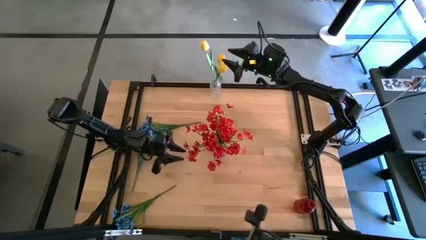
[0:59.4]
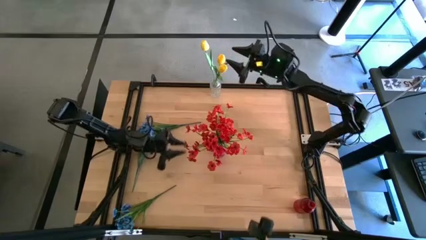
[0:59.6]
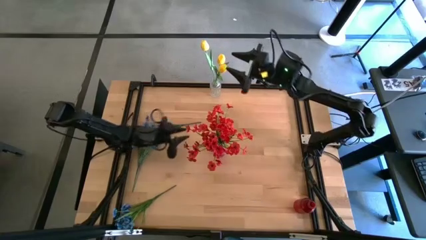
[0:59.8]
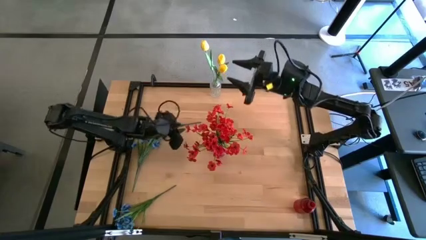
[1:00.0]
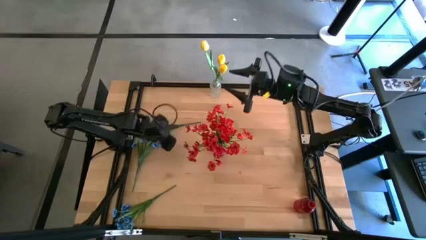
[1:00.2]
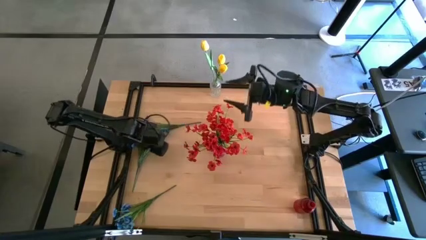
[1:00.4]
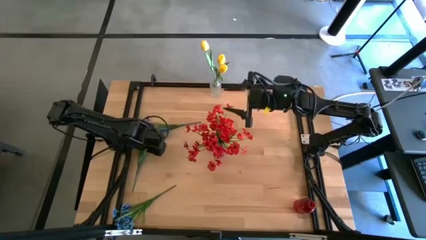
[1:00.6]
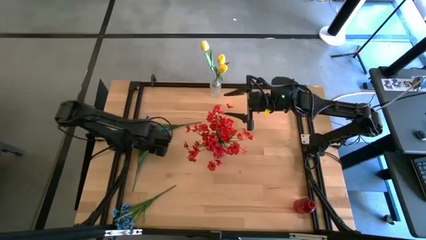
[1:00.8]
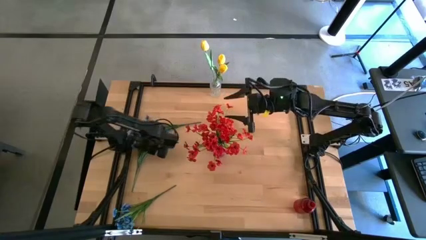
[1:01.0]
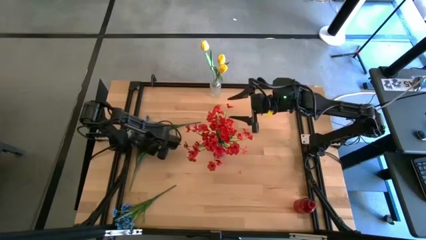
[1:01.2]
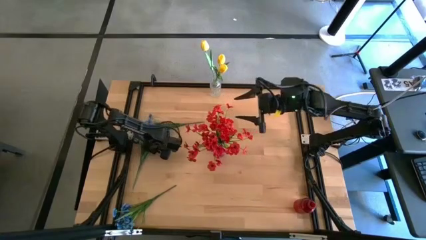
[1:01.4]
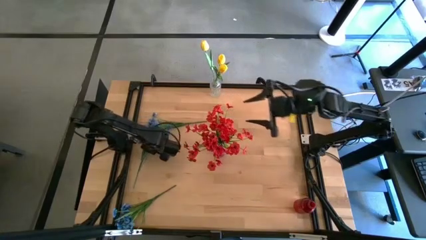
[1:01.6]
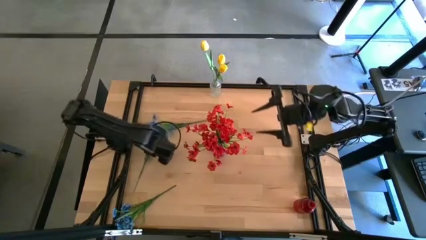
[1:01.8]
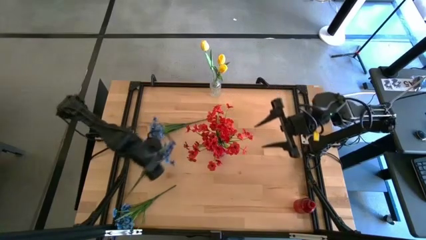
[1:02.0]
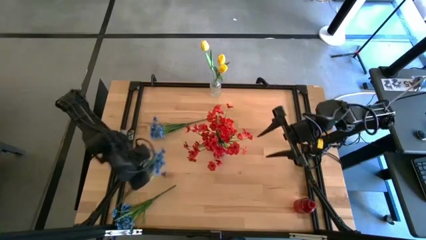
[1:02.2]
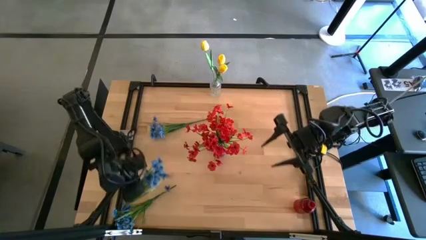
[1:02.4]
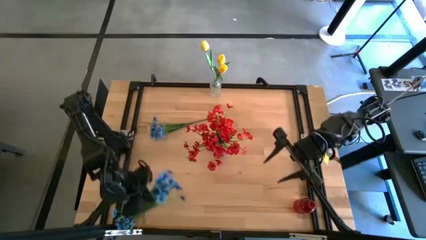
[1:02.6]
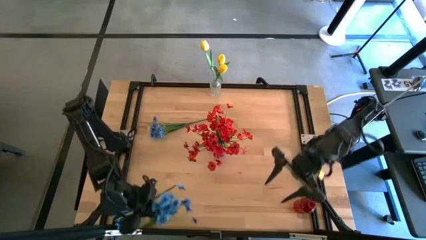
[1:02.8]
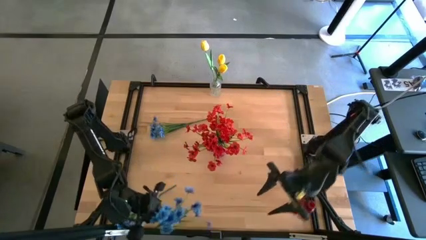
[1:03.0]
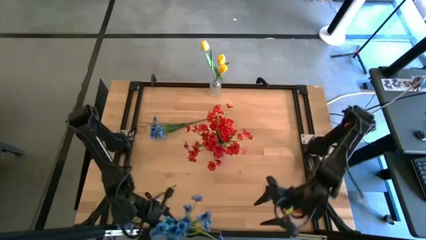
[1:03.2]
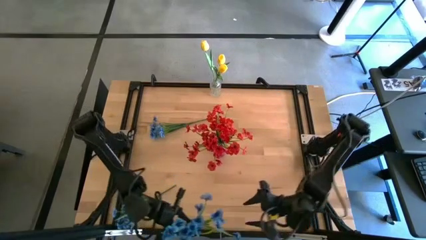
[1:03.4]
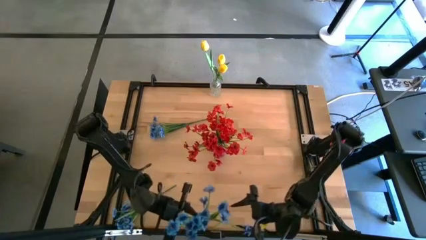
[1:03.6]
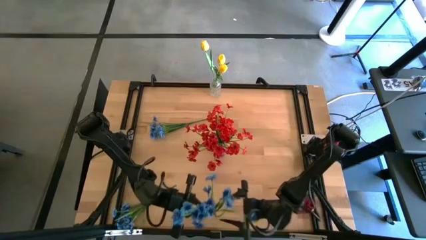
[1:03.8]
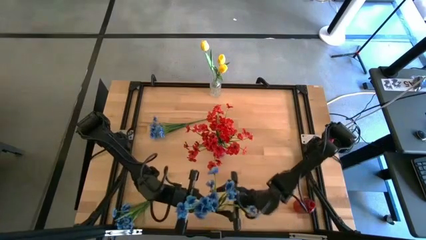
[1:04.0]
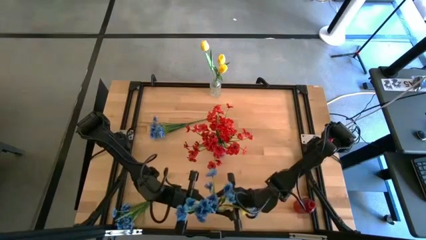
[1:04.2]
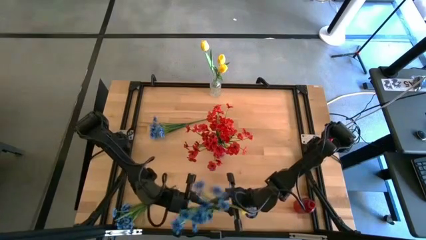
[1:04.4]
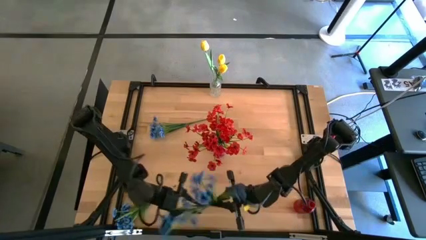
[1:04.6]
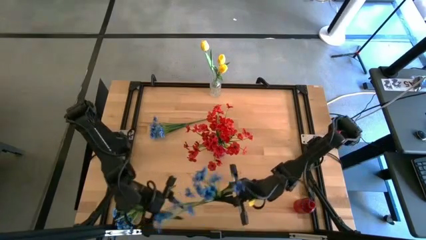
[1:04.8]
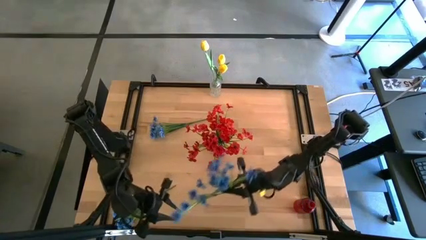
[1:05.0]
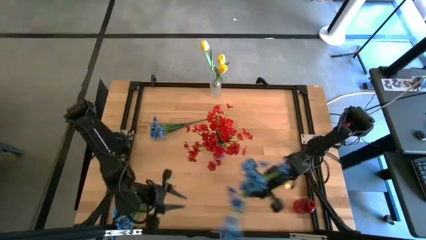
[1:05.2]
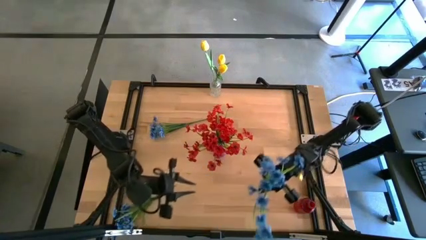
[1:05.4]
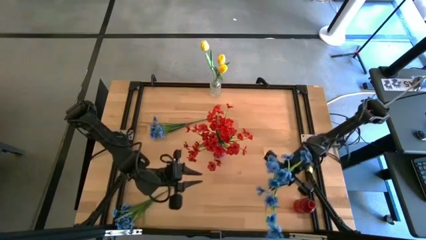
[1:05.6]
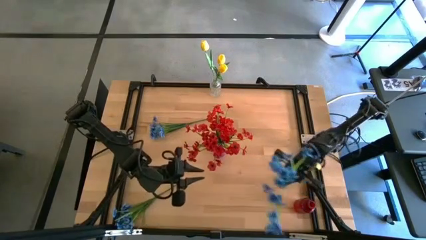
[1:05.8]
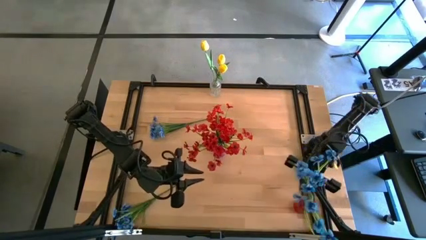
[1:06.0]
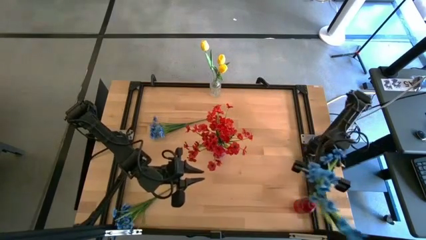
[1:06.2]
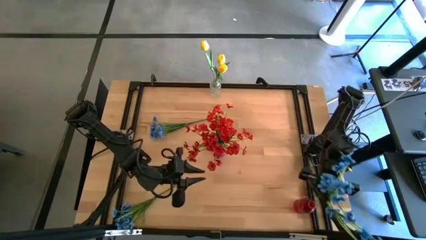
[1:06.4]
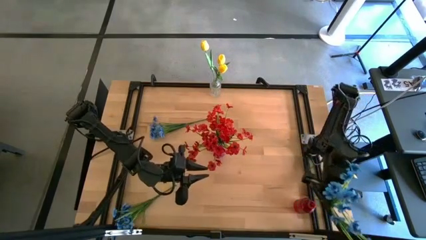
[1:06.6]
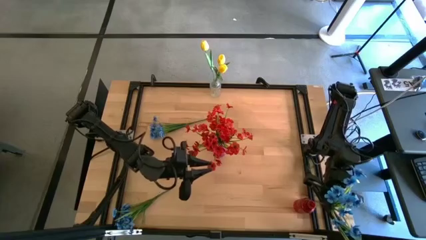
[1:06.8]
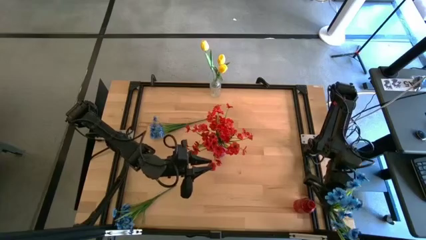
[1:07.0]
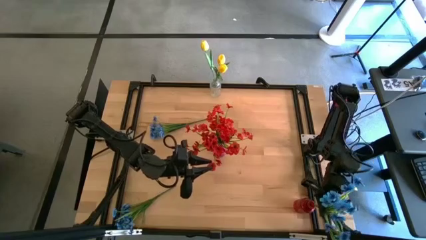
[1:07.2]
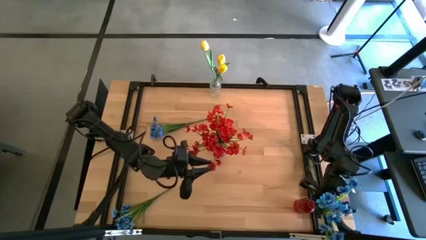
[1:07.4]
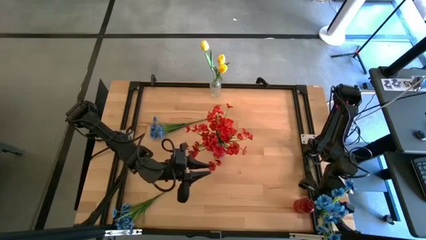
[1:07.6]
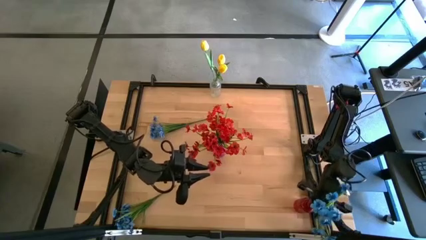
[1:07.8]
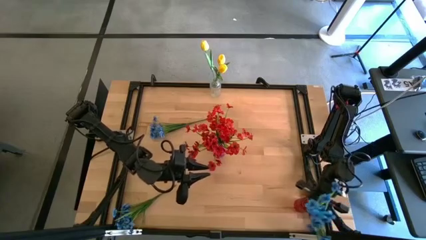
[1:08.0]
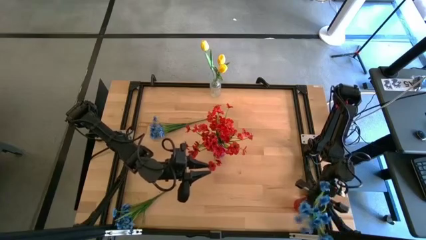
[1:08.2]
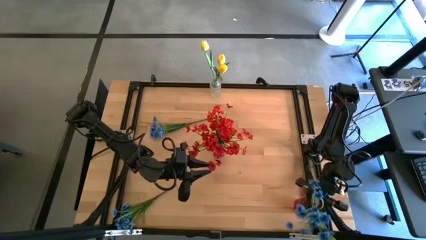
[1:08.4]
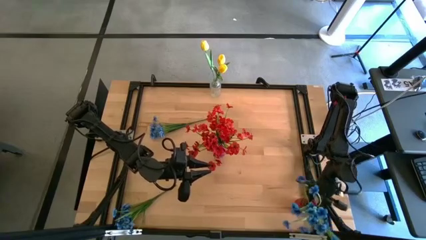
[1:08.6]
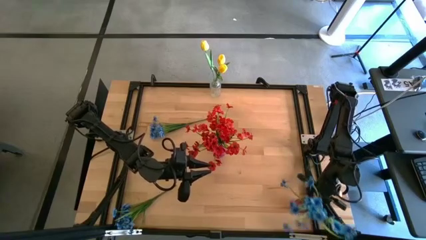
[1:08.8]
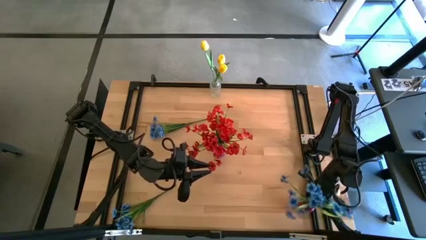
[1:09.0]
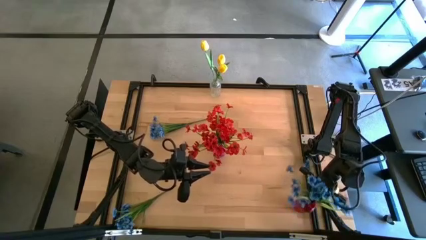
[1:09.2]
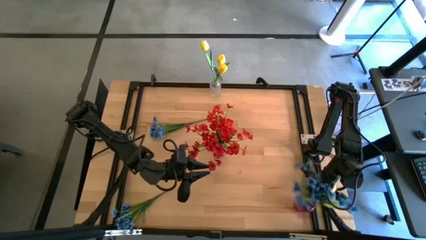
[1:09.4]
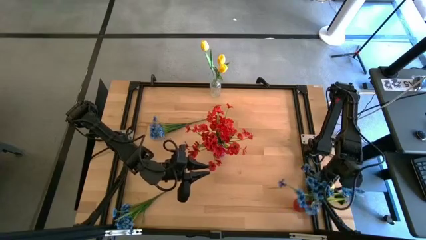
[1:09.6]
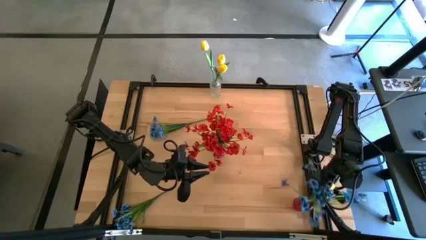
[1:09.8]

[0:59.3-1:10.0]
Task: Sort flowers into vase by color
Put the middle blue flowers into the red vase

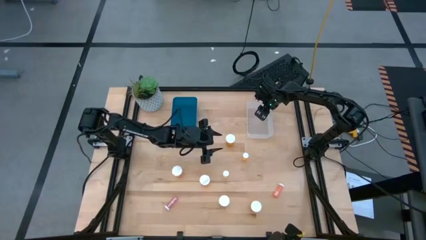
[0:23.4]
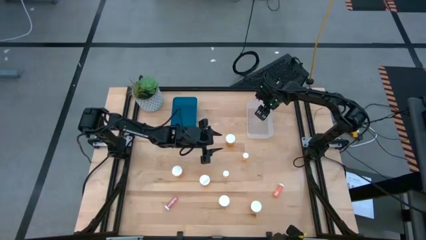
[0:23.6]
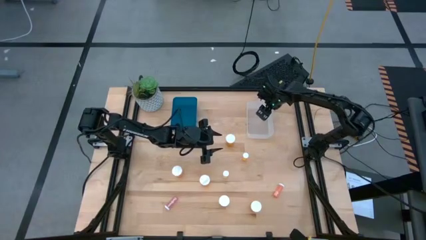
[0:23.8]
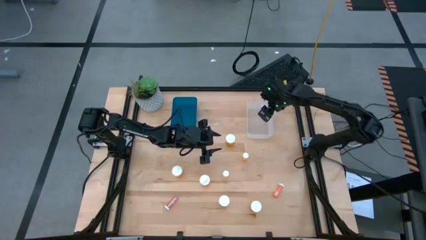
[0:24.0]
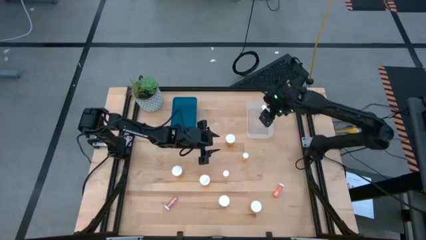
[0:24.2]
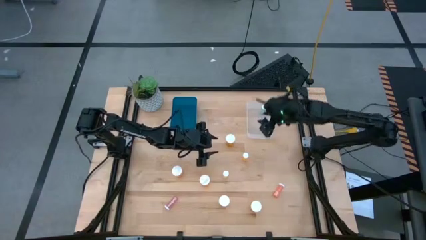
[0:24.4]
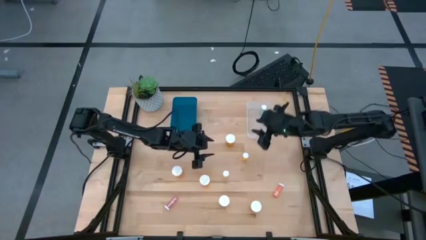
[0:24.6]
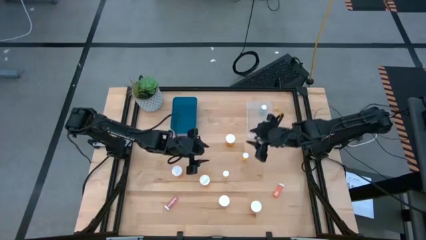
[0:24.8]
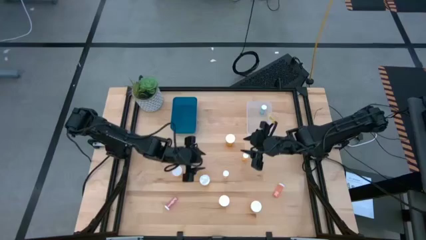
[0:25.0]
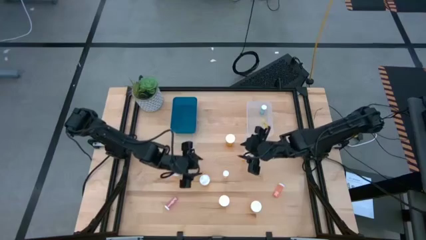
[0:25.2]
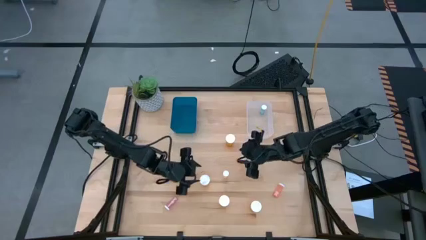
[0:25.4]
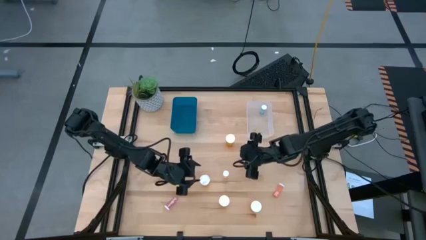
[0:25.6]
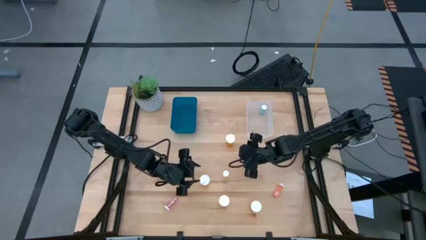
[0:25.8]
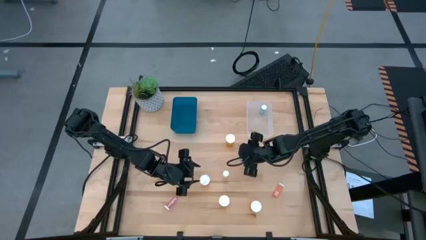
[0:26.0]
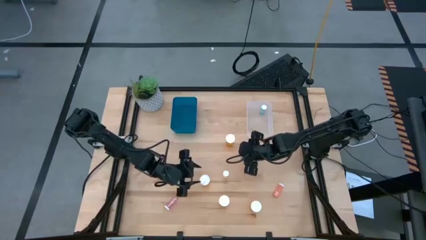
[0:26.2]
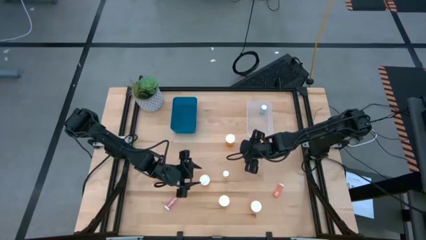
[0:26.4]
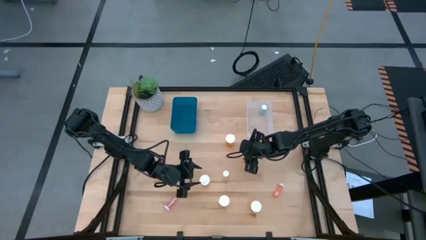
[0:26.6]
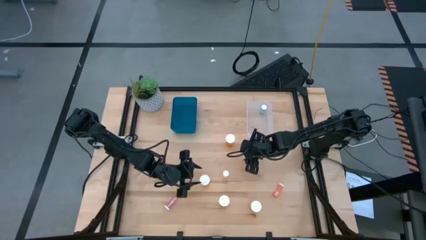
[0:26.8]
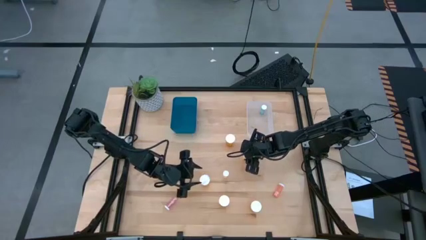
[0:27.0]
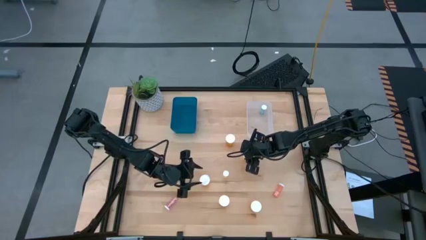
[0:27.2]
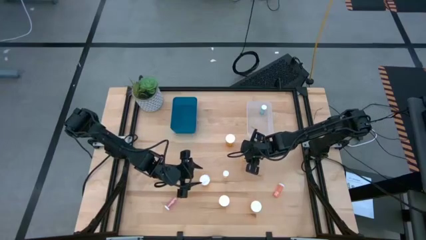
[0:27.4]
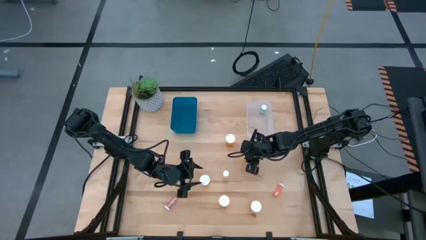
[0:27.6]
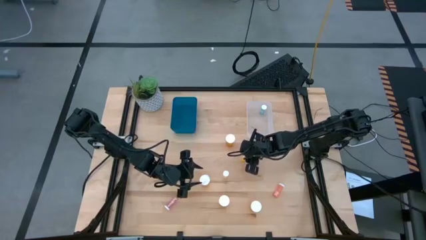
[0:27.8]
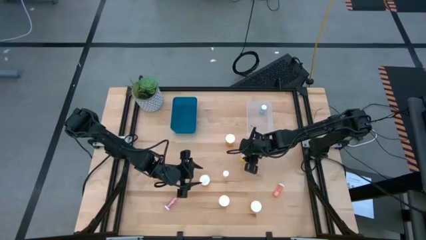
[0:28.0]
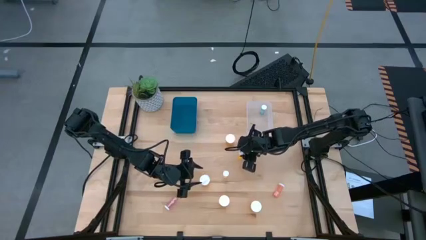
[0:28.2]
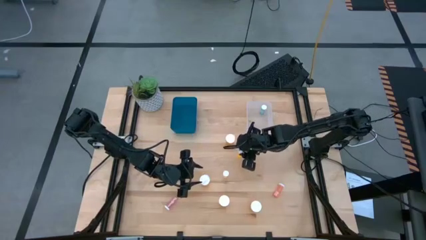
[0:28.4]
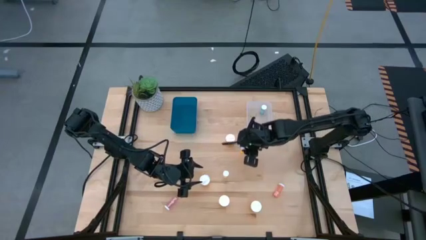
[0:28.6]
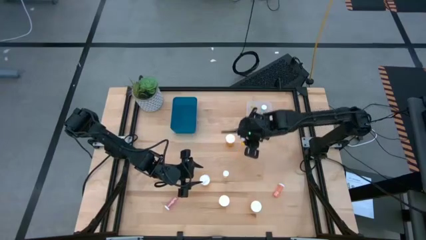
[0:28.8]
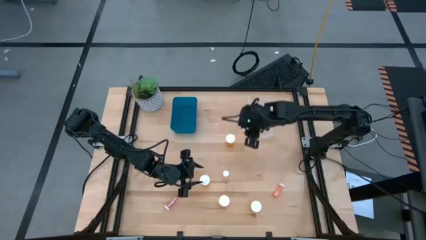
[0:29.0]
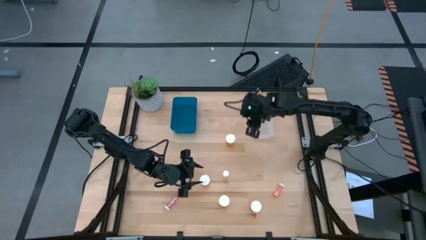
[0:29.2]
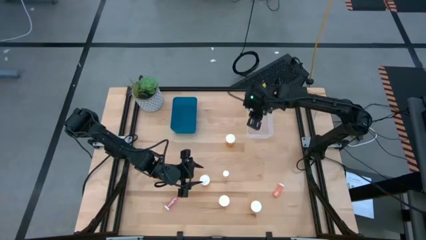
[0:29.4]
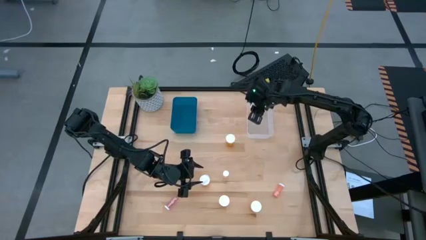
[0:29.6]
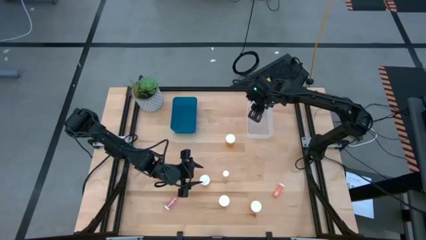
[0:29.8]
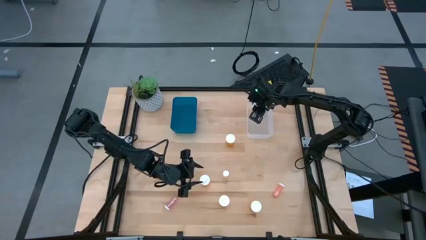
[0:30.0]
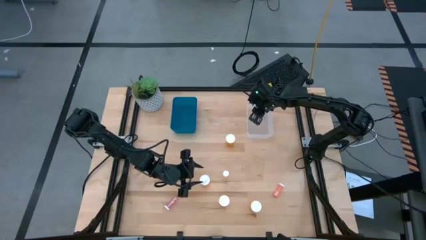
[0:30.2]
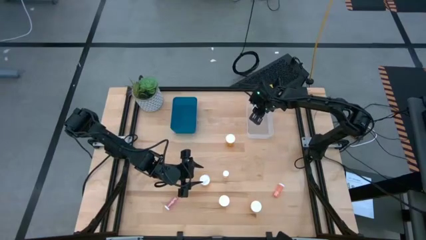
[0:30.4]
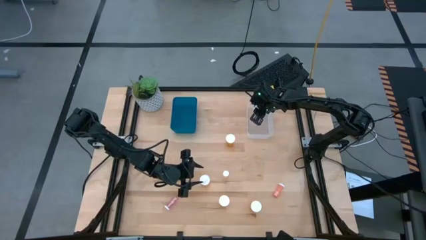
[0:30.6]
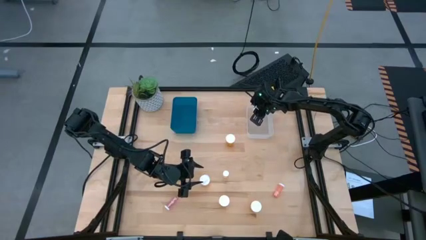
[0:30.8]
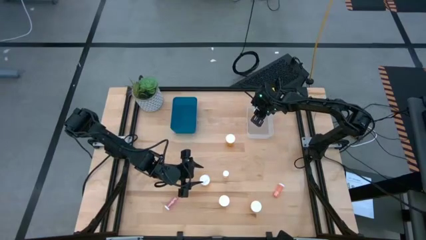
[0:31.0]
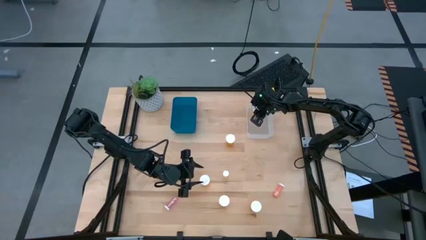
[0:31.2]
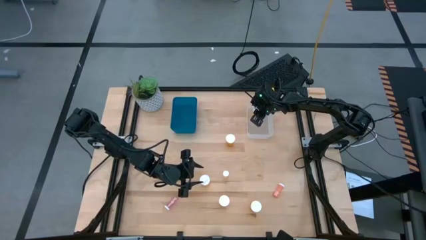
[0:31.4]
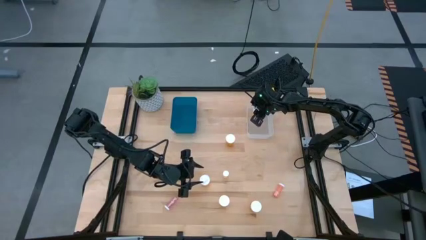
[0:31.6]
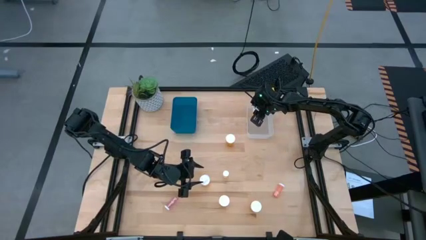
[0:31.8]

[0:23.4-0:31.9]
Task: Pick and place medicine bottles into bin by pill shape (circle, oval)
Put the small orange pill bottle into the transparent bin
